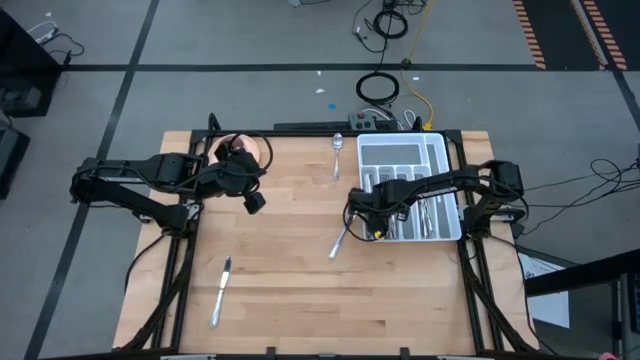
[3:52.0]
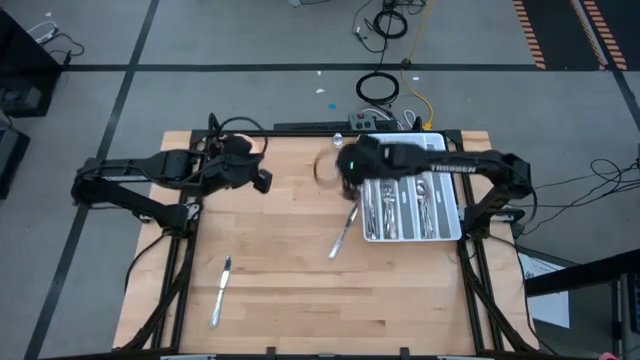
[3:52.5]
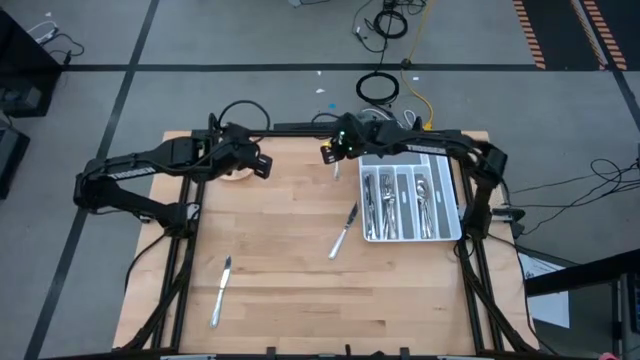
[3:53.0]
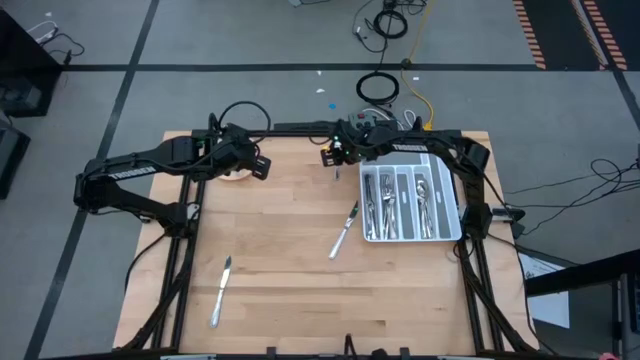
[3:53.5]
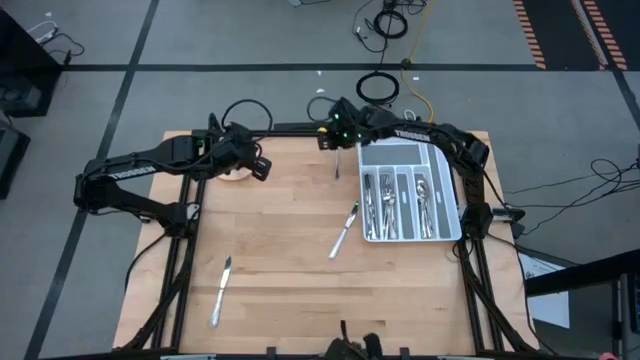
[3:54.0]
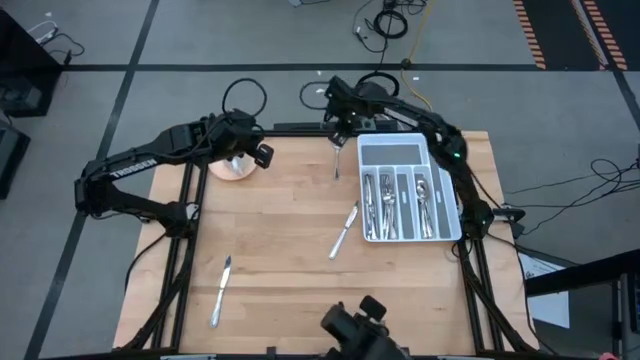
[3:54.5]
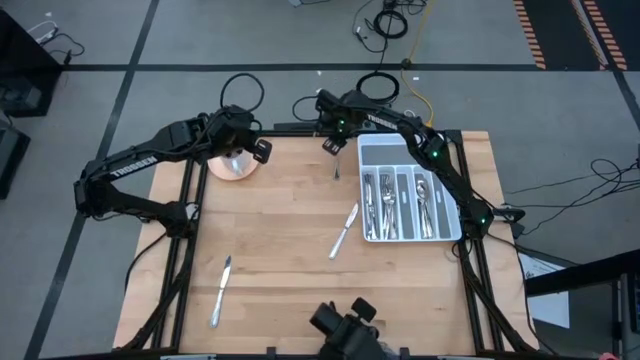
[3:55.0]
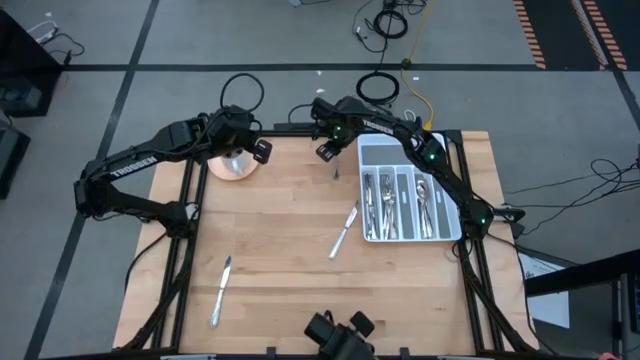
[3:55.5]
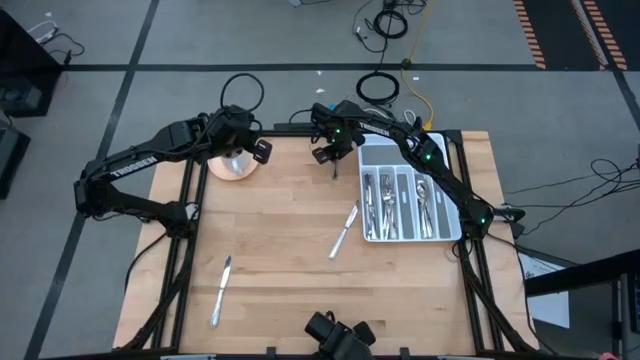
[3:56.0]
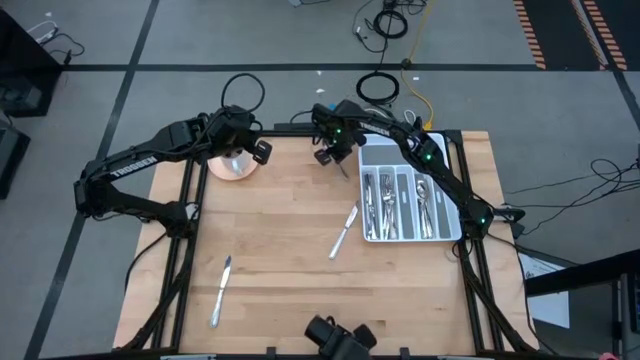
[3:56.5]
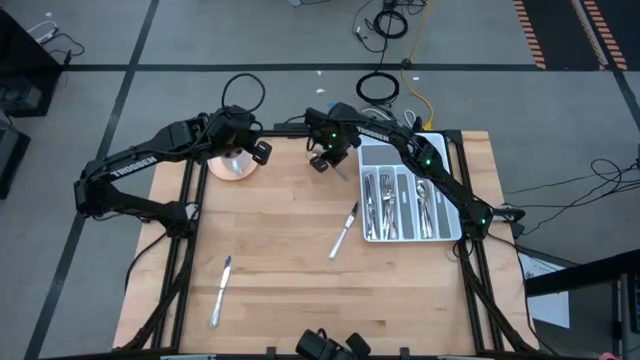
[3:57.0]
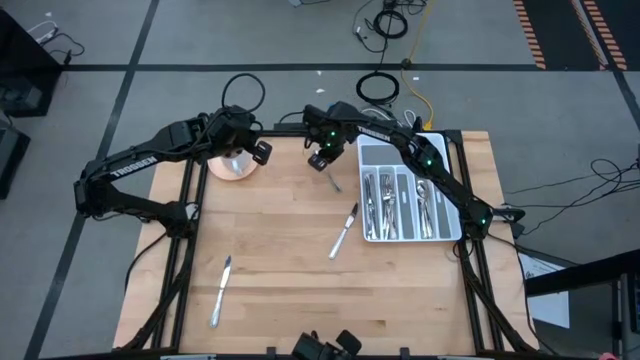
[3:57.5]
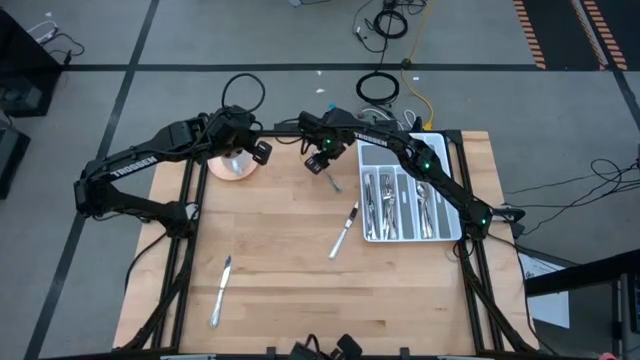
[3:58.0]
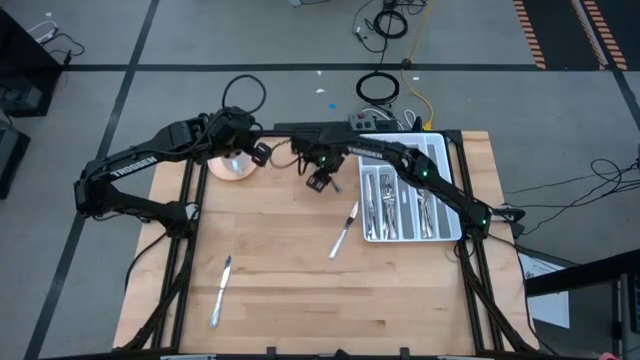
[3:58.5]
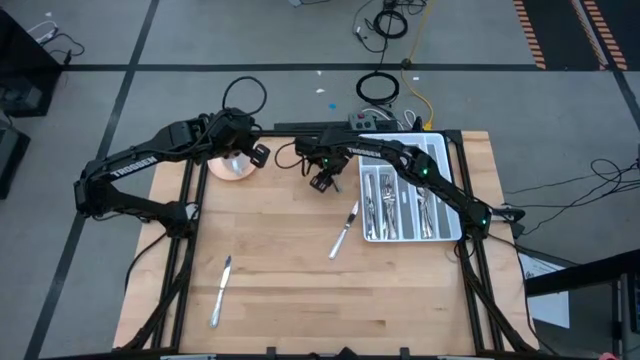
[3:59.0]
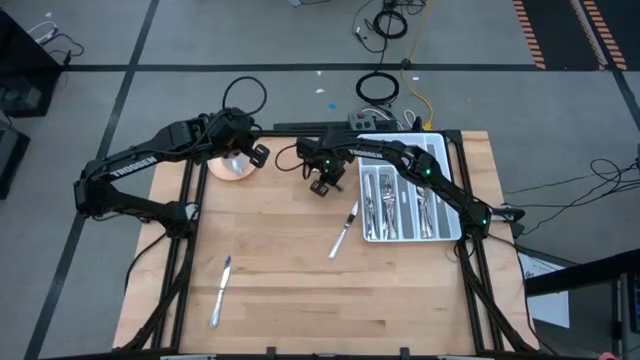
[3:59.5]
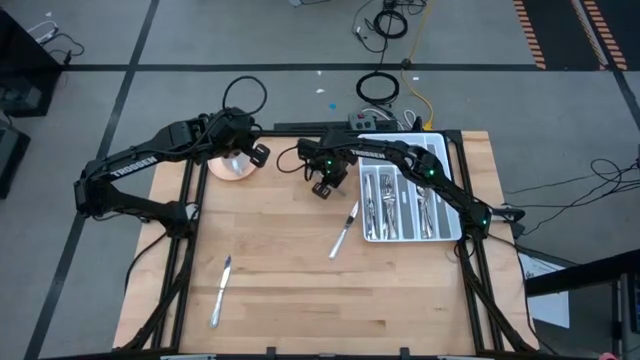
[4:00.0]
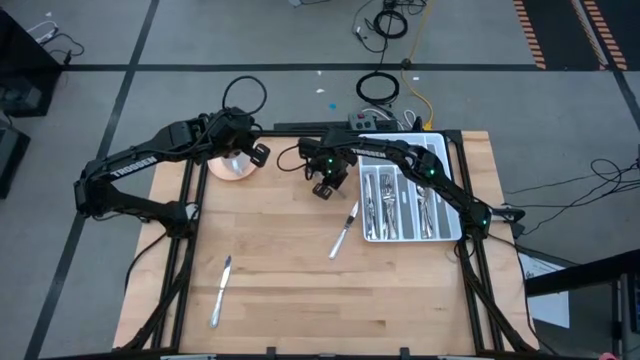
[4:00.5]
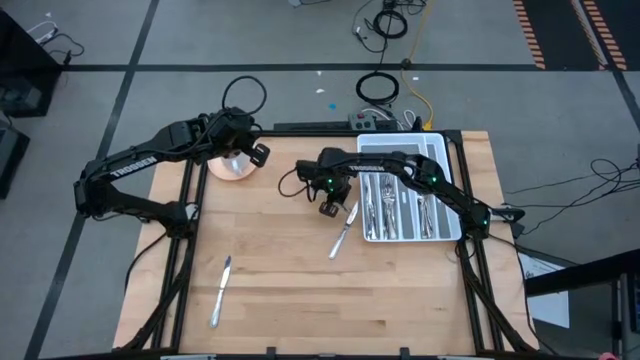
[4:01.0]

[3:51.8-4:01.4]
Task: Sort silverware
Put the silver spoon into the silverware rack

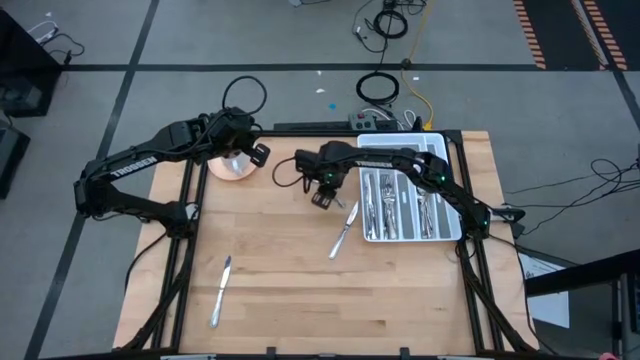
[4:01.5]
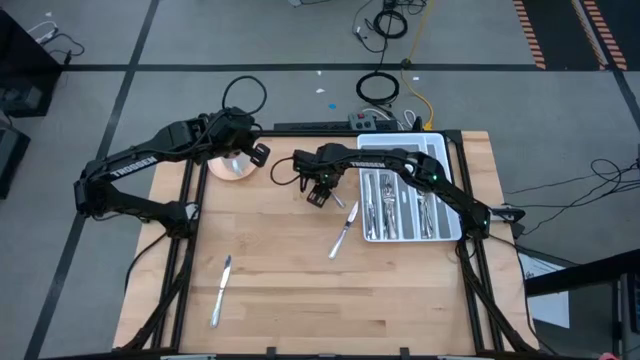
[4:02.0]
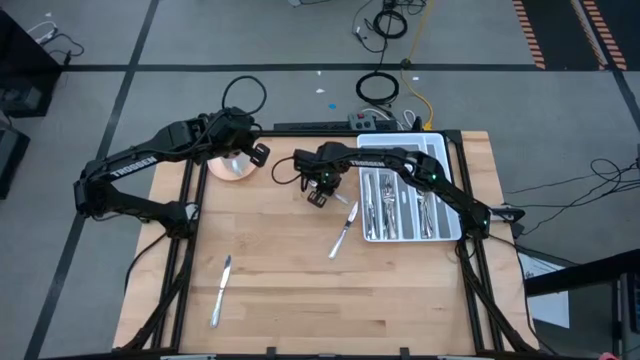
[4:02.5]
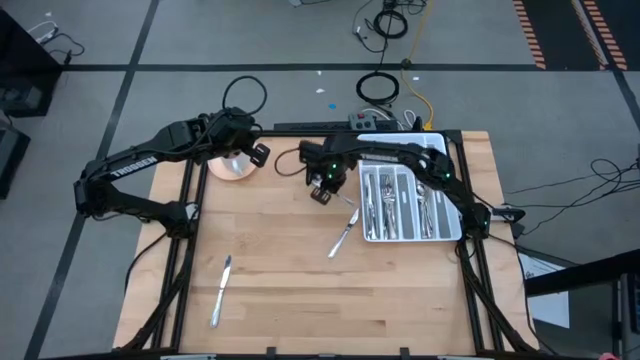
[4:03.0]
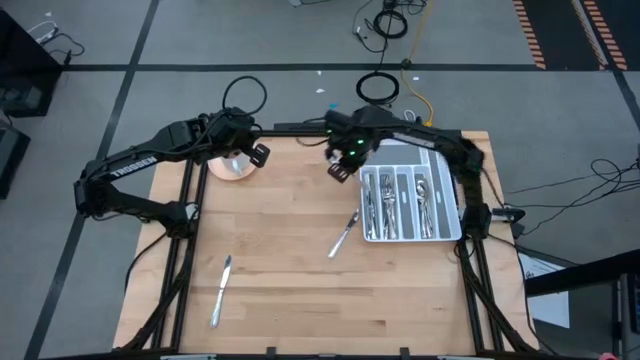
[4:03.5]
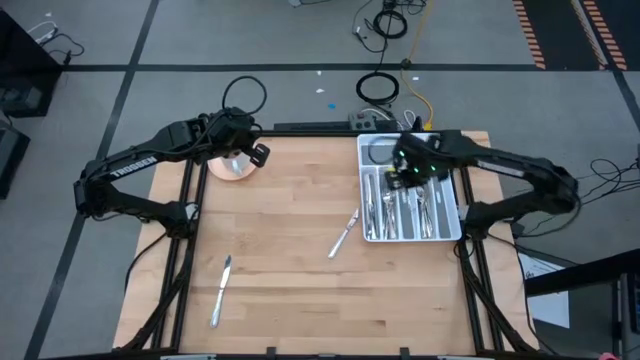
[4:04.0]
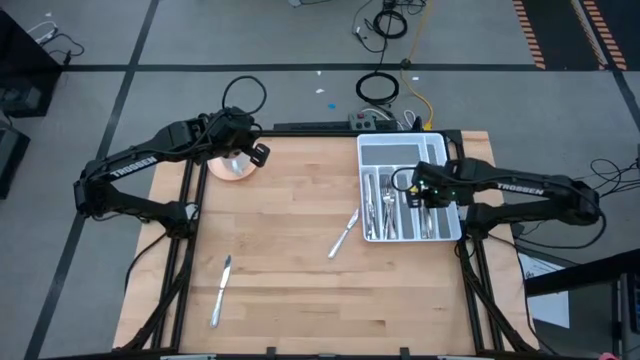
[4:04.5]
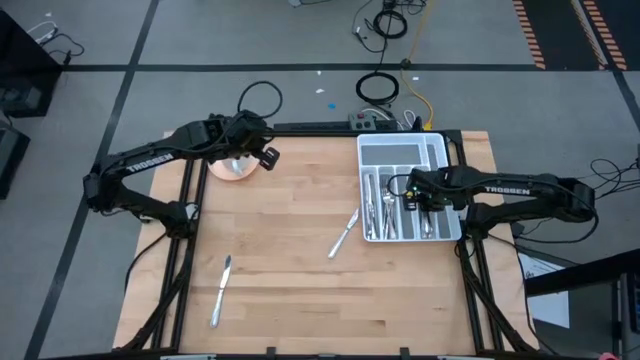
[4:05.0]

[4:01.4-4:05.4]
Put the silver spoon into the silverware rack

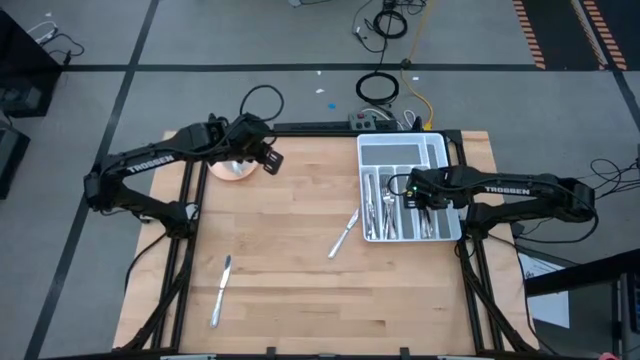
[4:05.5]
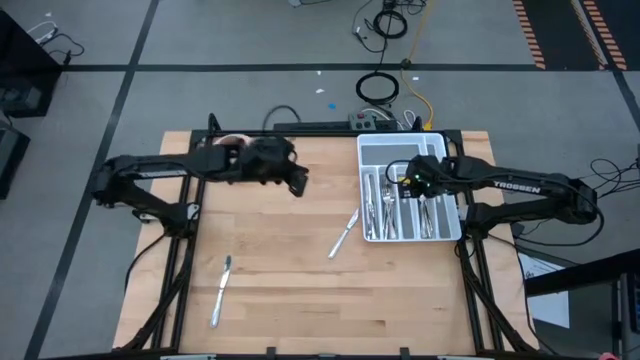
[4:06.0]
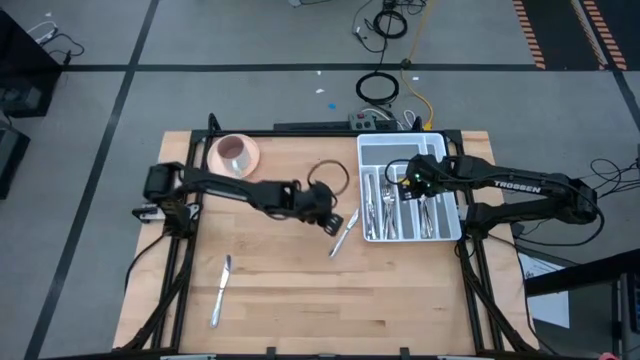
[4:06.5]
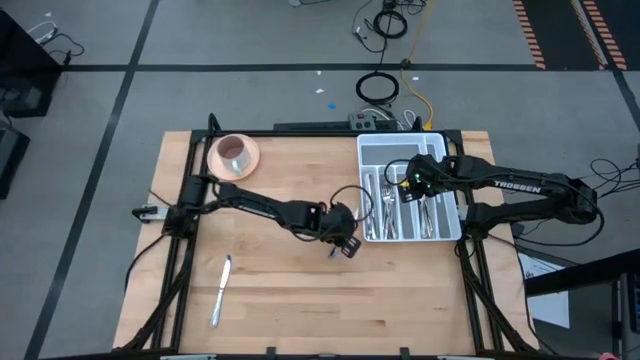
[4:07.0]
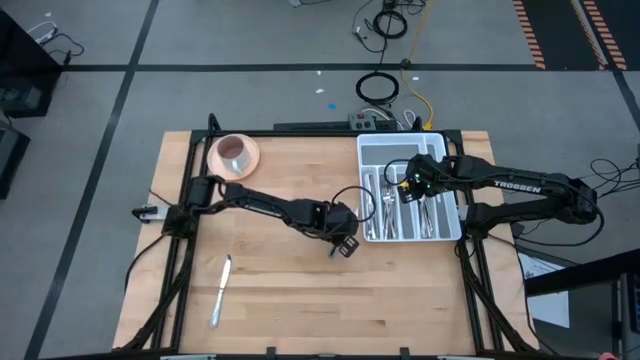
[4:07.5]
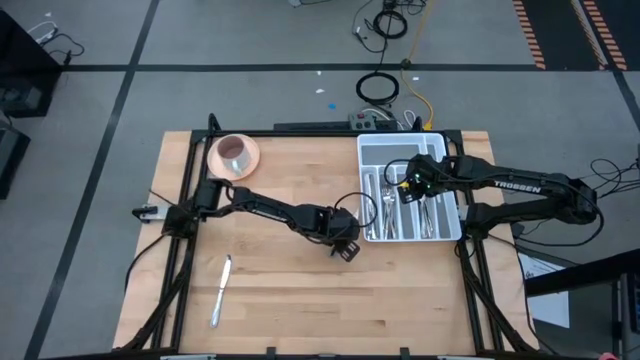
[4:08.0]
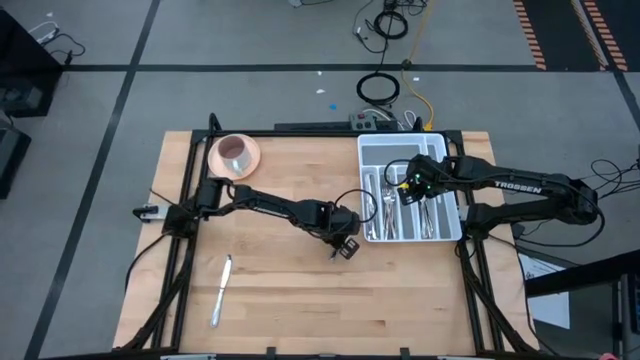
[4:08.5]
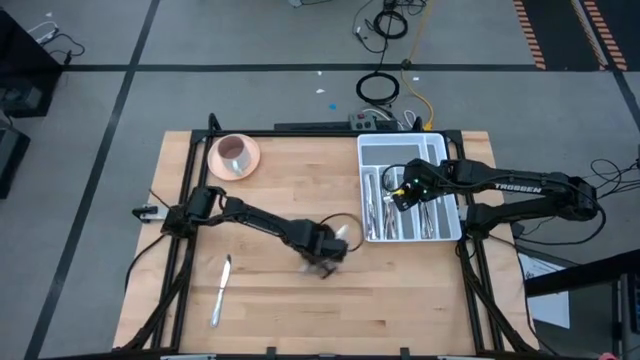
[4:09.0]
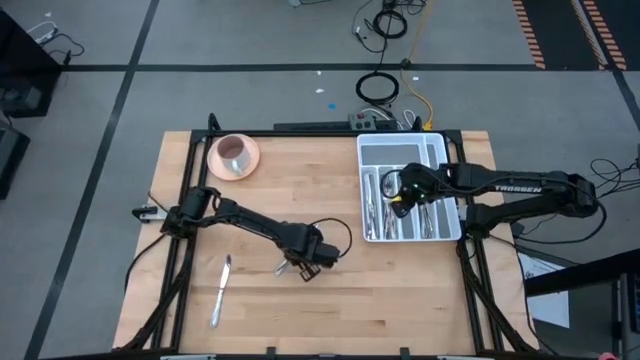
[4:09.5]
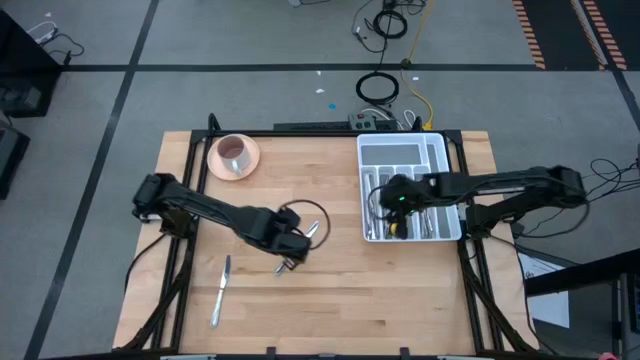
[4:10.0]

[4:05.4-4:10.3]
Put the silver table knife into the silverware rack

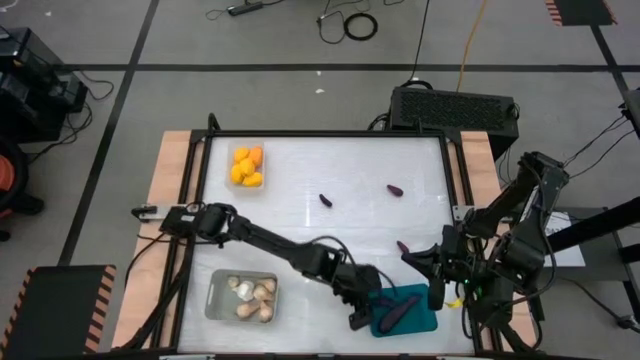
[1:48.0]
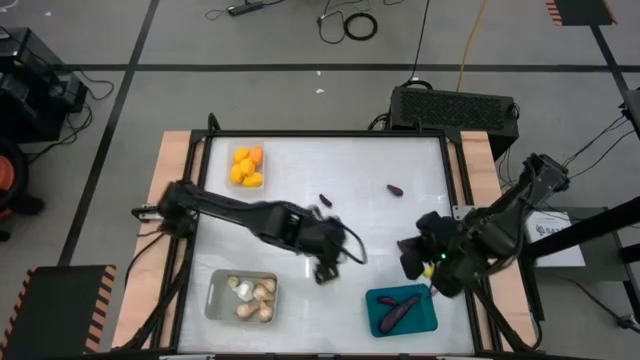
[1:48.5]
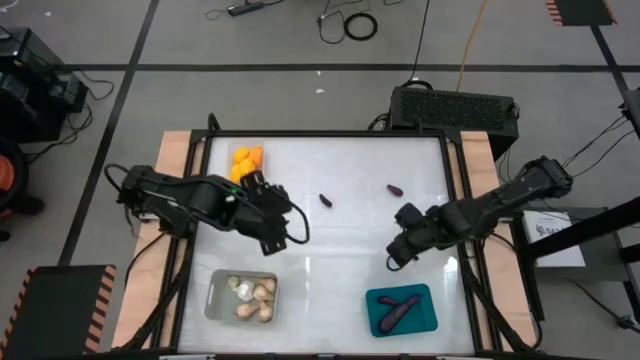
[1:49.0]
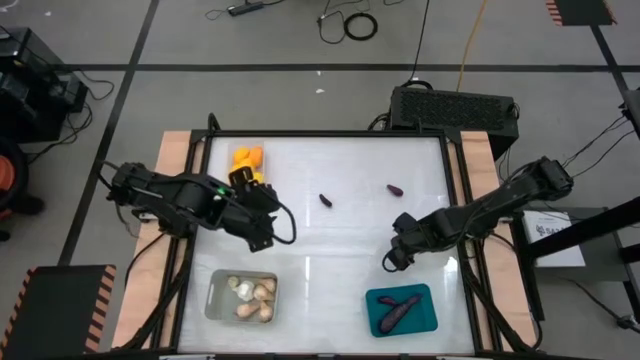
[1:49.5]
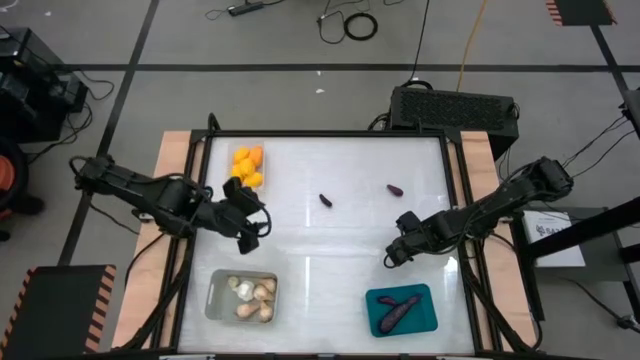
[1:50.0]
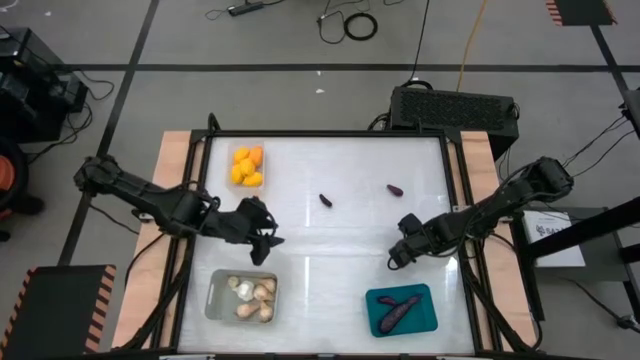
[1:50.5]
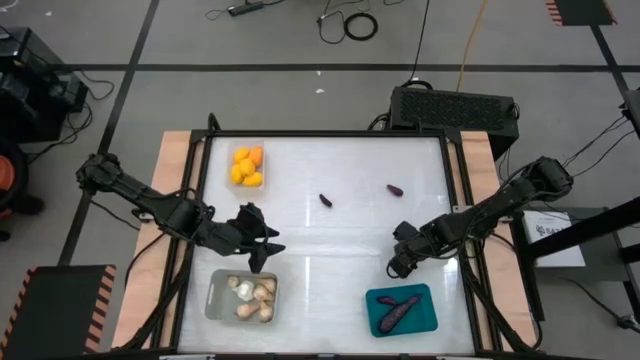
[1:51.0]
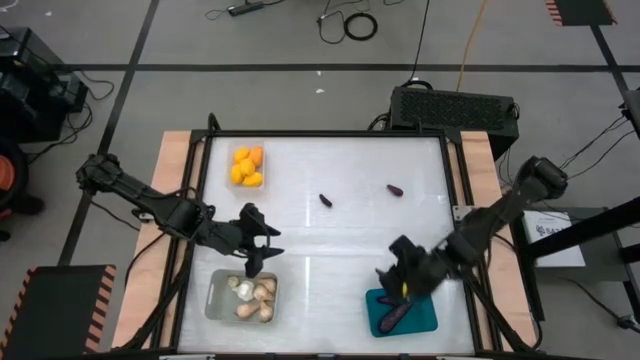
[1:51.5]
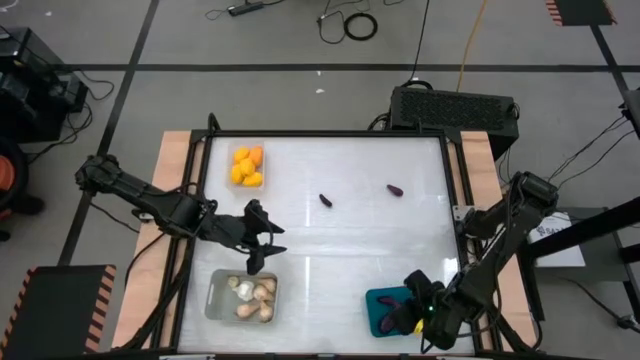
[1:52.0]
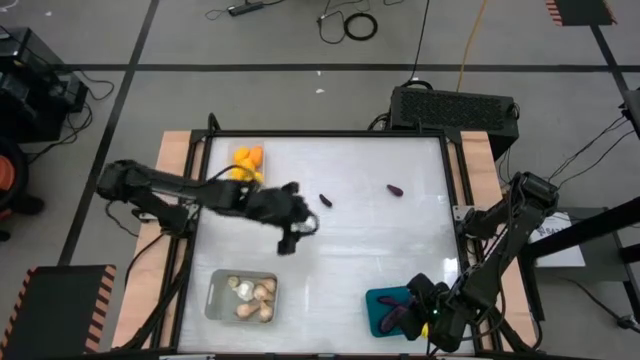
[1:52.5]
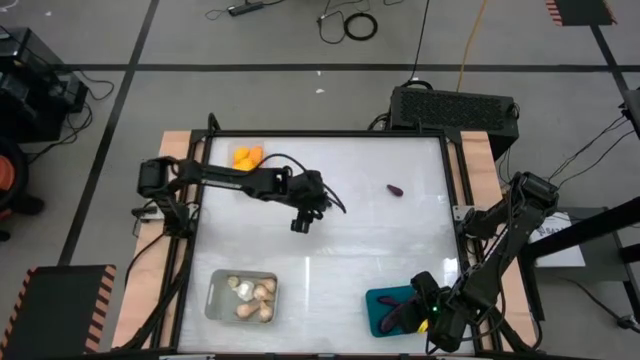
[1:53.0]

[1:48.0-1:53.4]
Task: Sort produce into baskets
Put the purple eggplant into the blue bin
